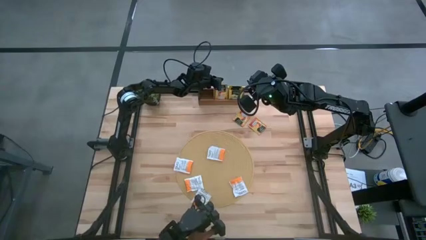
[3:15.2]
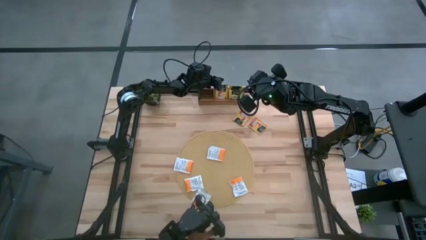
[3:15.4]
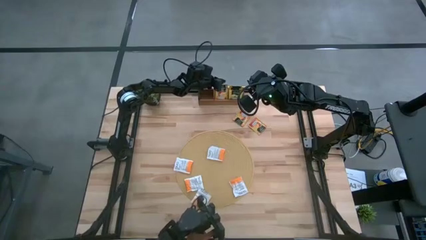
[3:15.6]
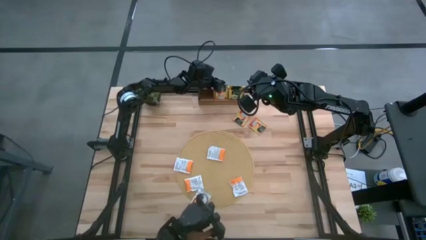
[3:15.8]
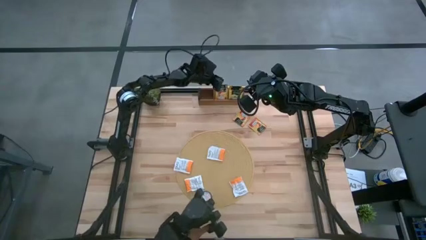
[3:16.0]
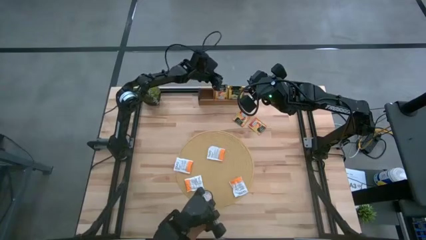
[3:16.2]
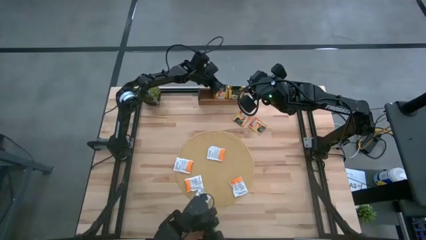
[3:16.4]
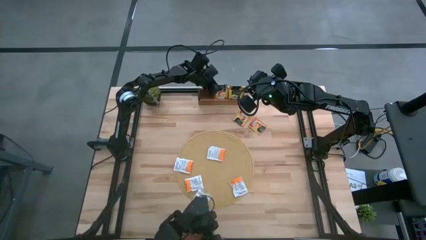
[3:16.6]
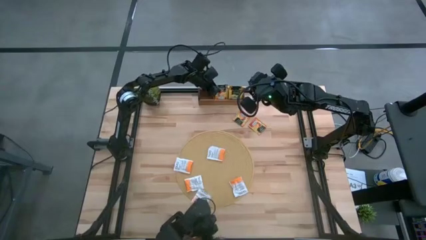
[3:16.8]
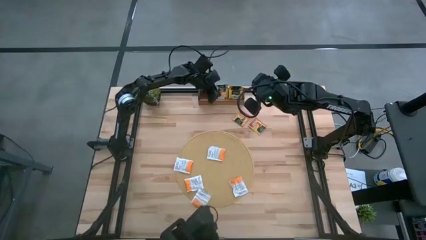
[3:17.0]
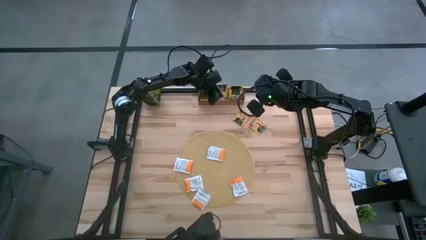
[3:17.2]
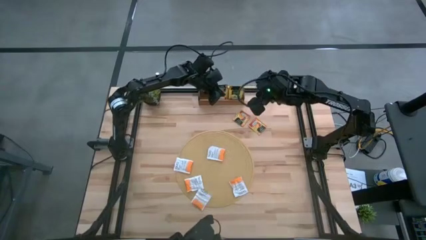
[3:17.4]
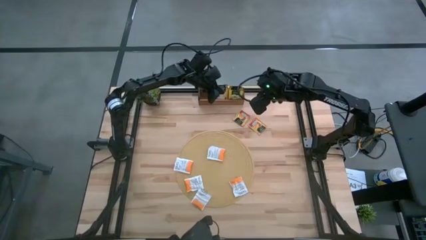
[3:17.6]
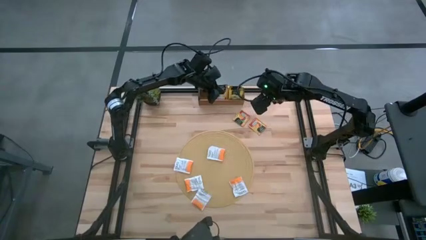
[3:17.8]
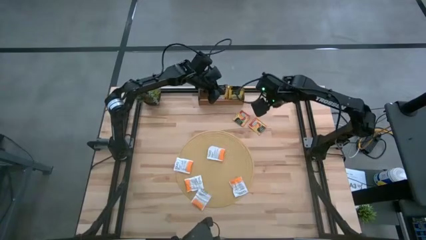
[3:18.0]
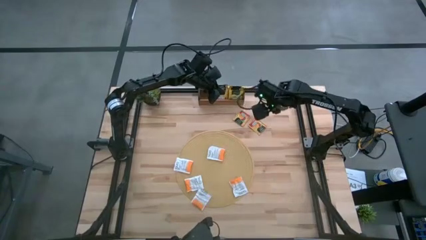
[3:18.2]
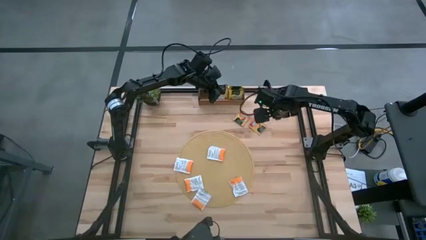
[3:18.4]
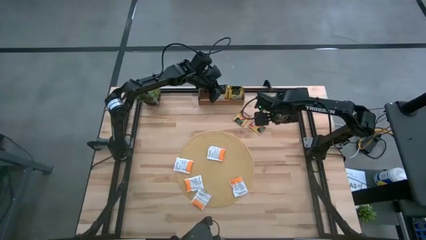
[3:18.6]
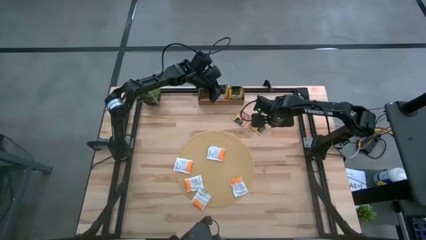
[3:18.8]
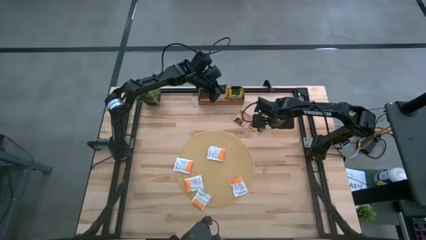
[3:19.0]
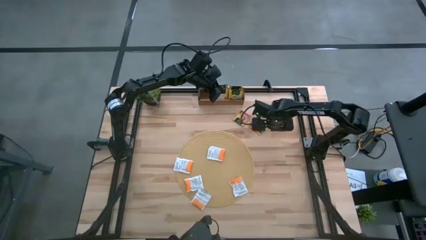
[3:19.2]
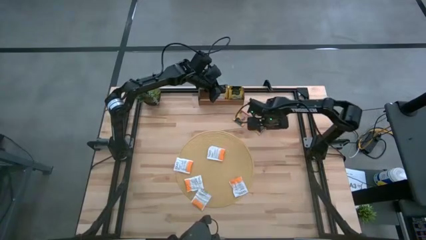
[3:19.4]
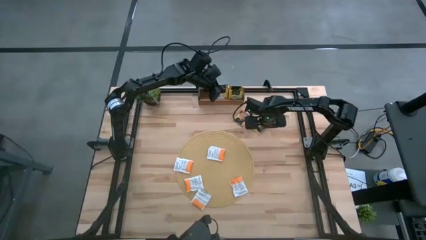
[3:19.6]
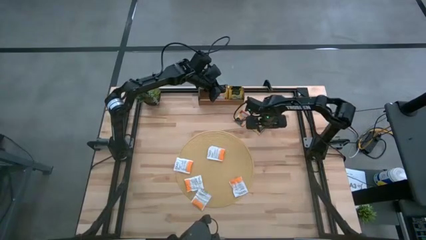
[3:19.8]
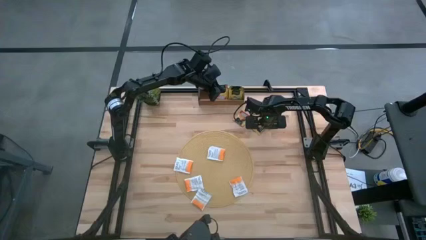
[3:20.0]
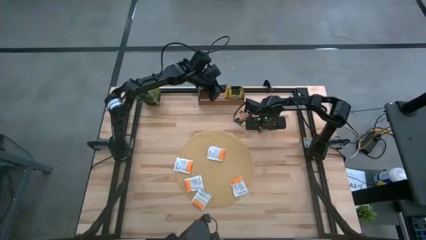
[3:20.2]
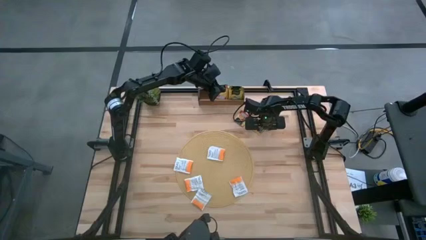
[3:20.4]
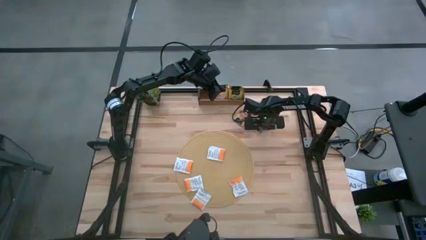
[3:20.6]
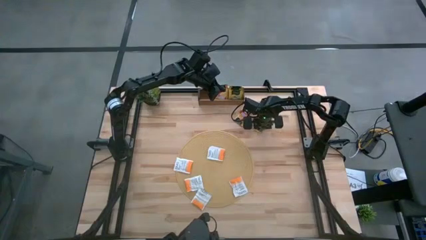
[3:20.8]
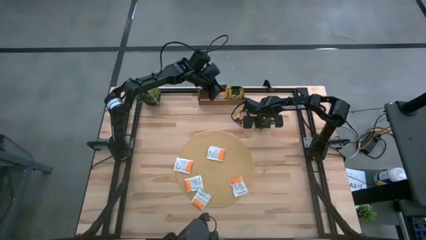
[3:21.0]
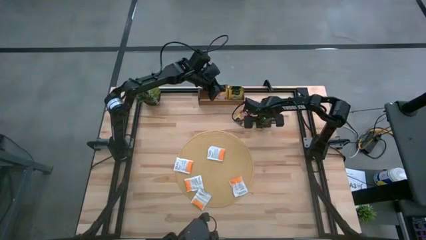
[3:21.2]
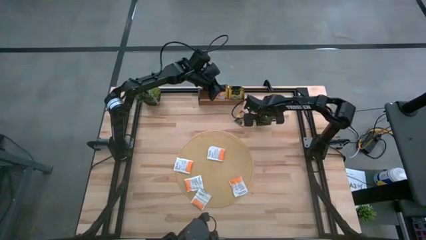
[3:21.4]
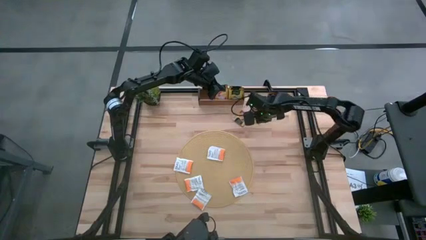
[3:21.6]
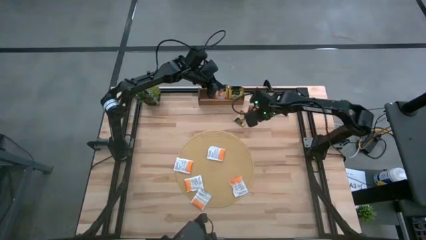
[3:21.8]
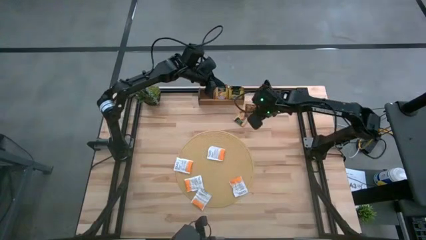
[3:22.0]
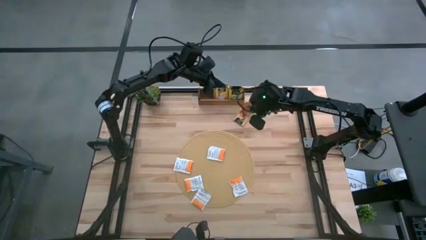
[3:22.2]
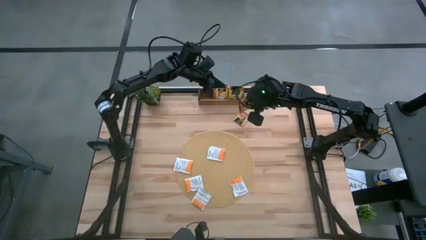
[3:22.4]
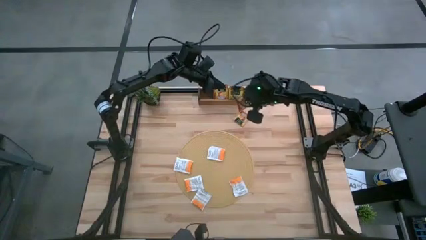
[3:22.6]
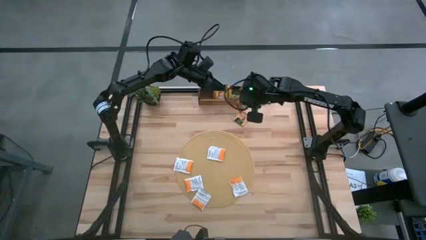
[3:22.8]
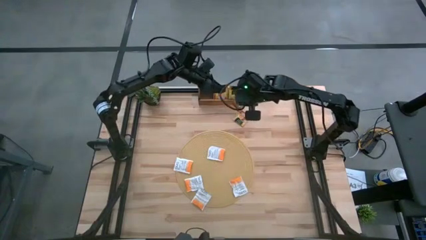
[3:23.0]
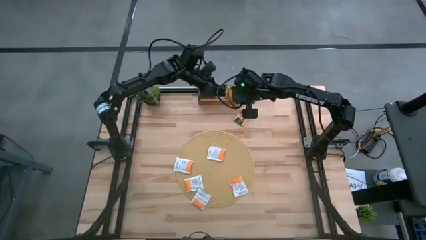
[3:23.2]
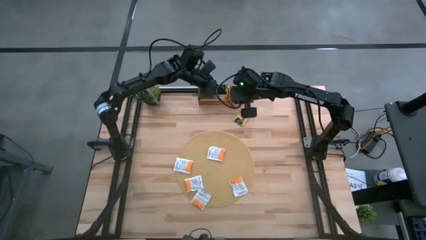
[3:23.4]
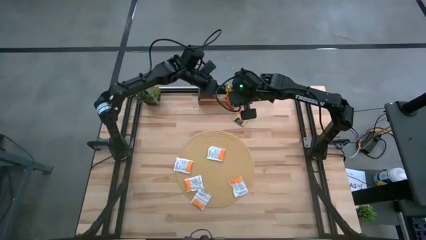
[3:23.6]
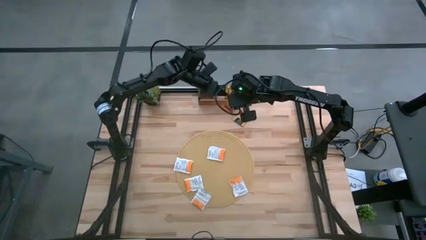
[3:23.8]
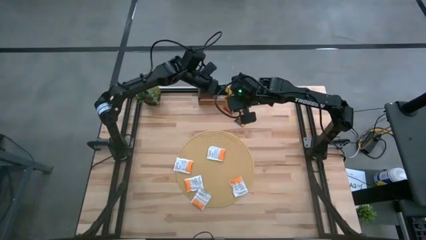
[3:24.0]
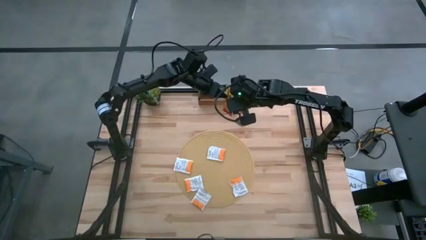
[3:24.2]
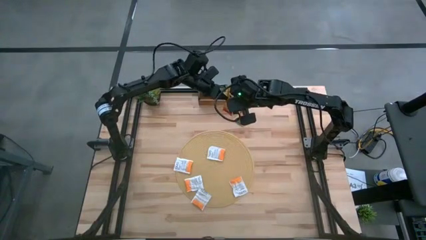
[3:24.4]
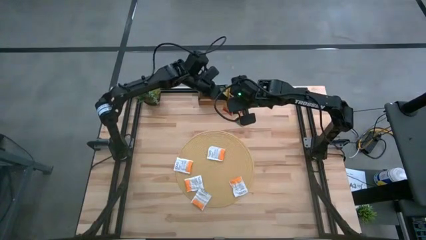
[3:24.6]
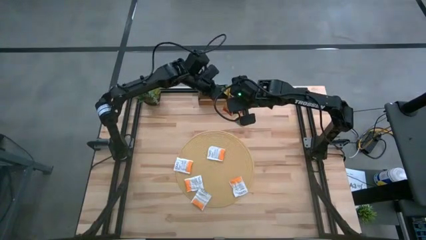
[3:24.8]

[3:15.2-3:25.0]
Task: Pick & Place Tea
Put the right red tea bag into the middle section of the wooden organizer

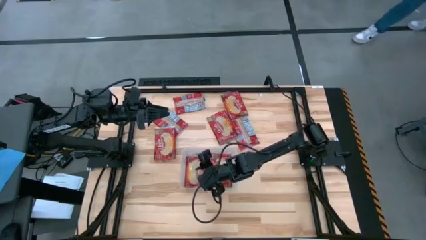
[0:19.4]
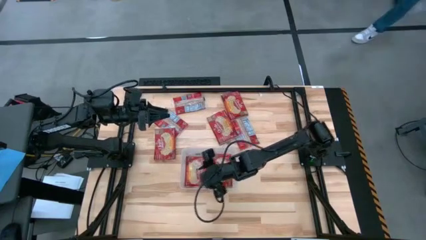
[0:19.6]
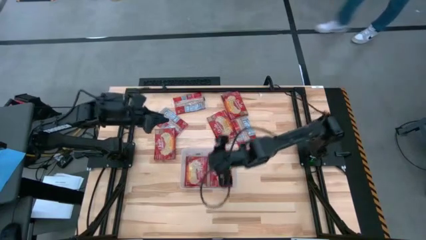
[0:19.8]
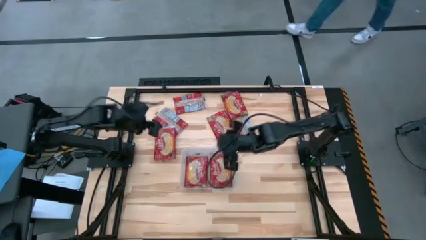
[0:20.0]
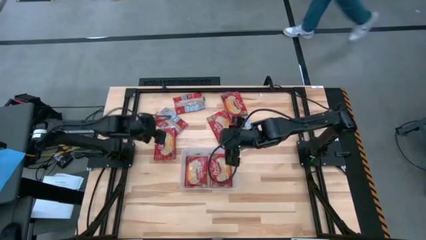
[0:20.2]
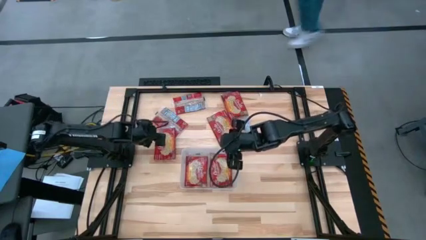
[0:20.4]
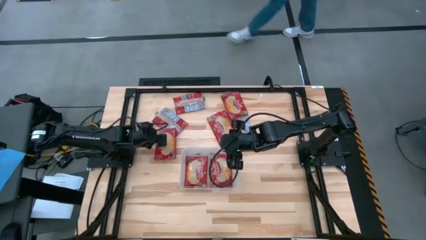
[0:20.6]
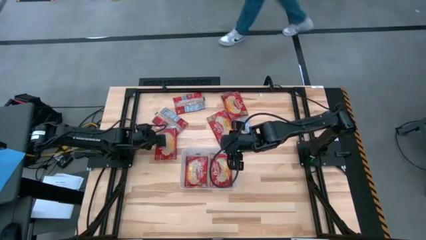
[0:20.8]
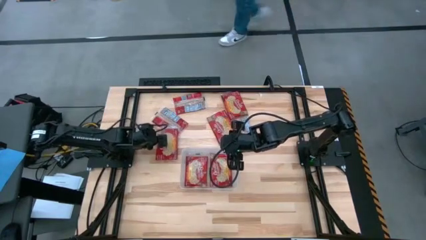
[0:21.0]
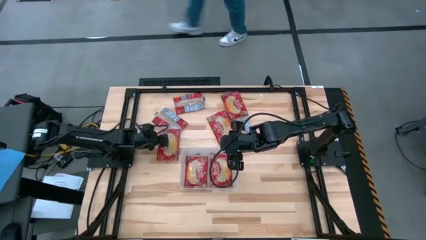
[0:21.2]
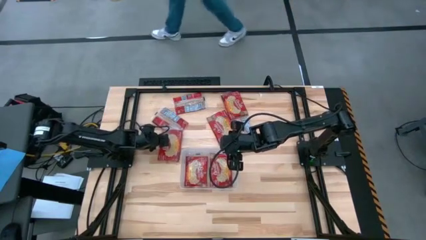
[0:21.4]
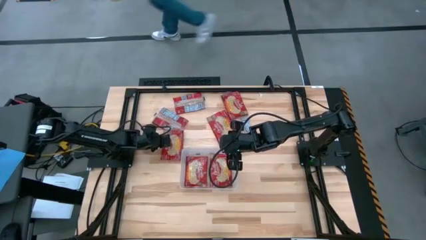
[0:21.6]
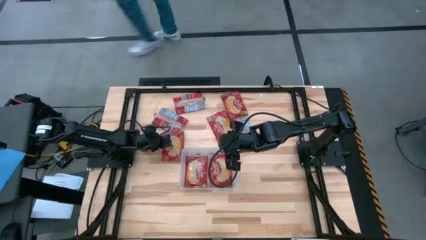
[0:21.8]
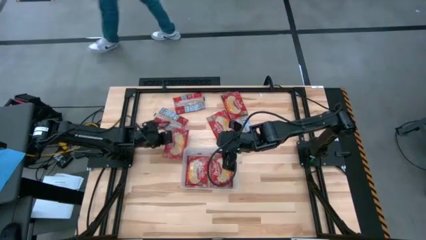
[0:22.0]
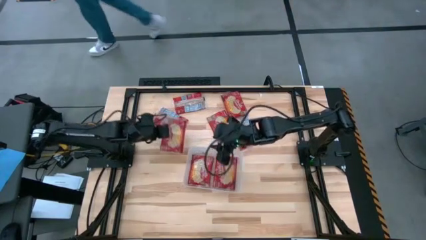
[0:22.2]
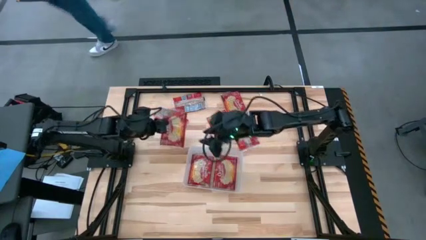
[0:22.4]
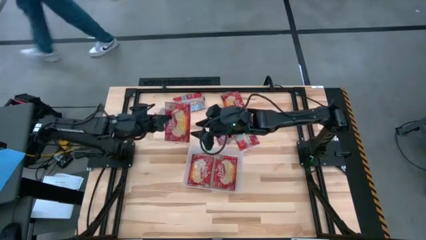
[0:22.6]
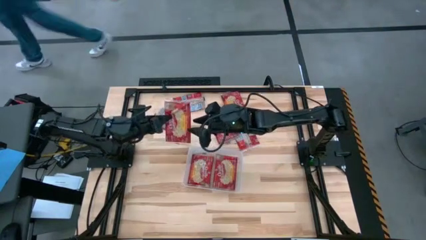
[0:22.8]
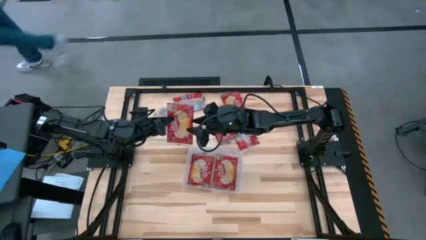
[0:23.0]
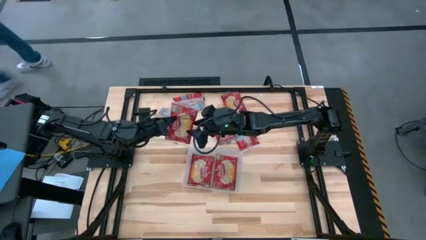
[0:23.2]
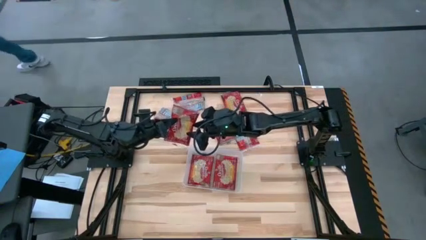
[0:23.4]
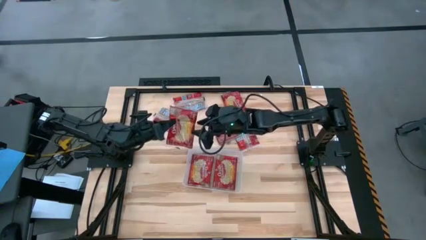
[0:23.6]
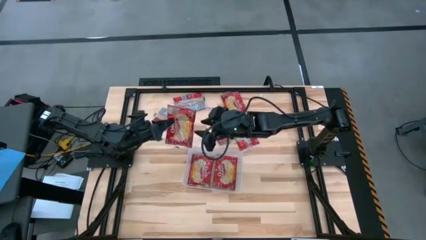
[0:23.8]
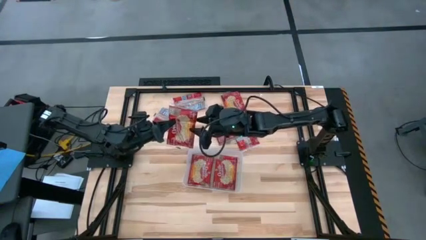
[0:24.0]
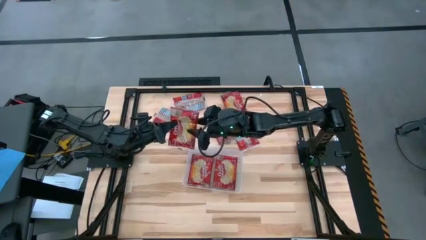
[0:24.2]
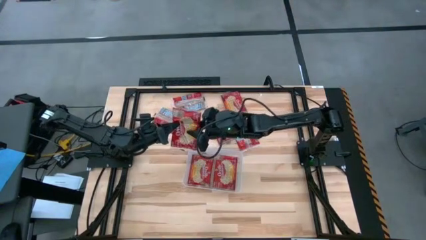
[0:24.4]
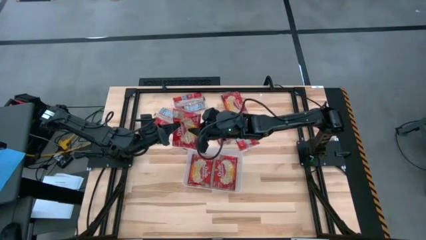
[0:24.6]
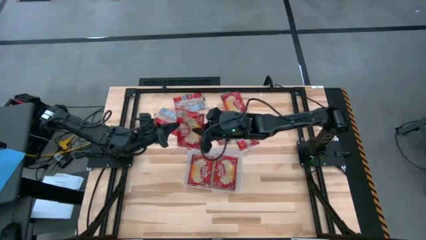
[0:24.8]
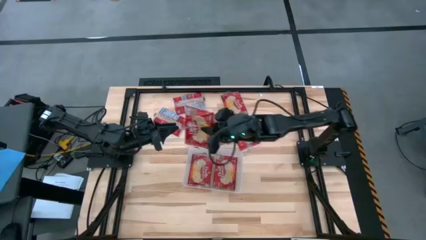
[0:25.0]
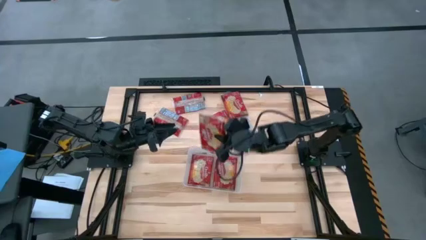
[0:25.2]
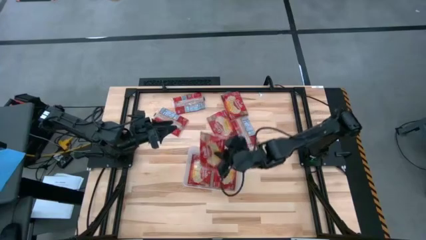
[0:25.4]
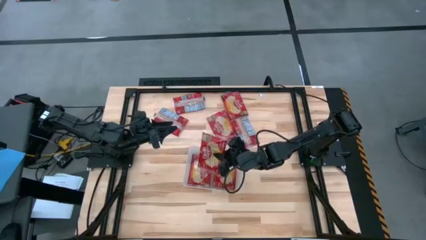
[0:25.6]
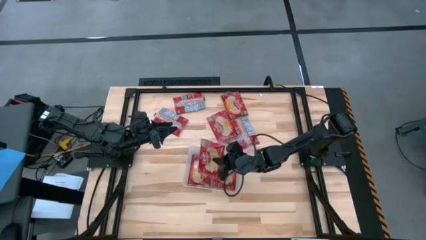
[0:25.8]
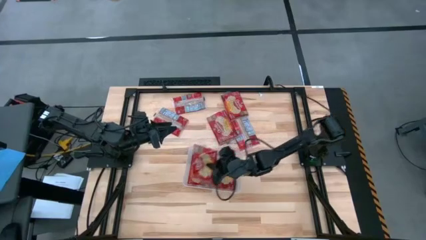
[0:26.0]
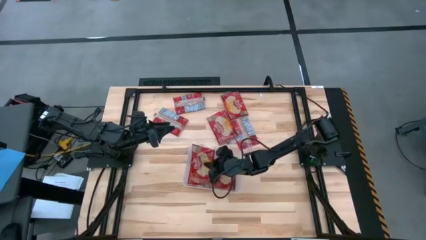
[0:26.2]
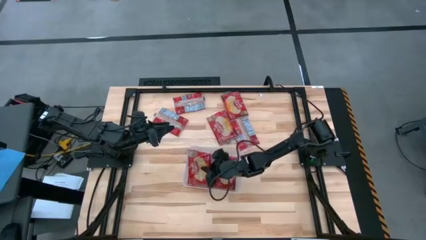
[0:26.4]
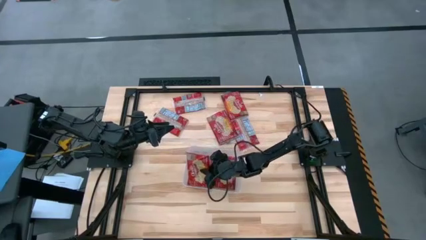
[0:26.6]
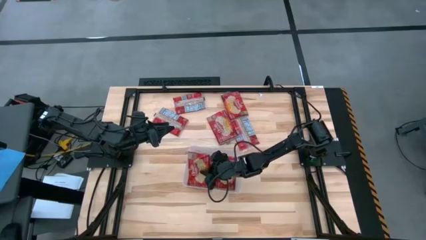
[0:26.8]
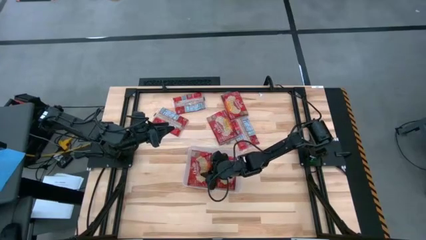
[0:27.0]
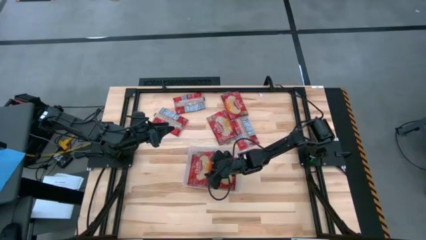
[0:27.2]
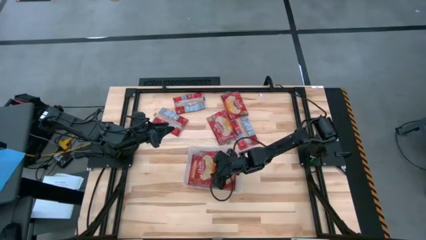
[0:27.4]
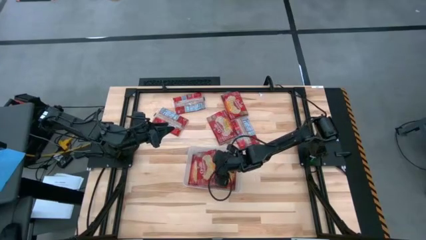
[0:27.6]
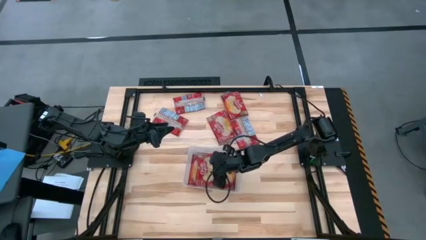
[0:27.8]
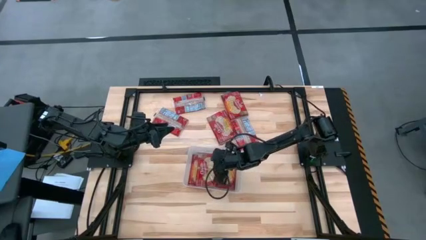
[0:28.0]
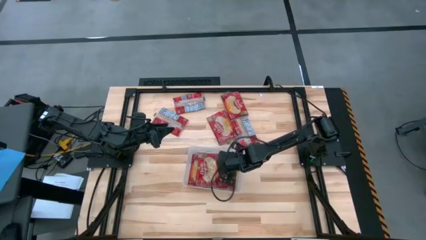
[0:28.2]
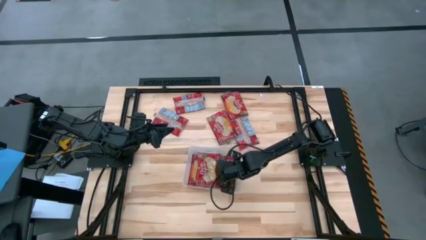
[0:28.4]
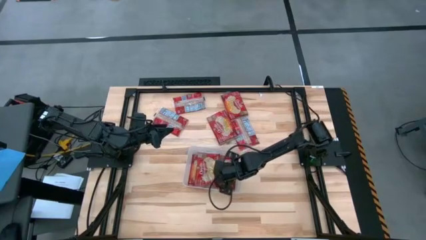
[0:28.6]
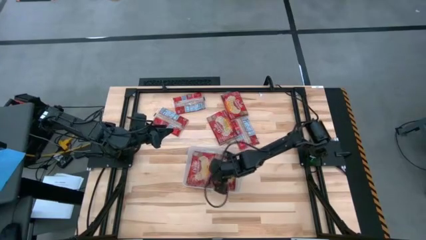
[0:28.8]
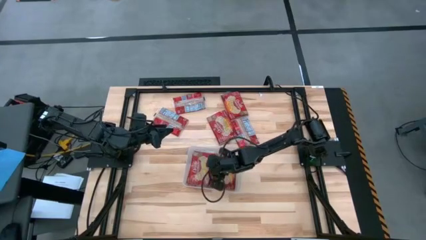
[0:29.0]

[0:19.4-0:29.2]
Task: Sort popcorn bags into baskets
Put the red popcorn bag into the transparent bin
